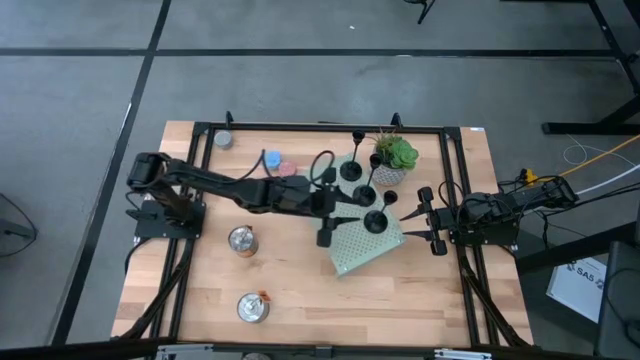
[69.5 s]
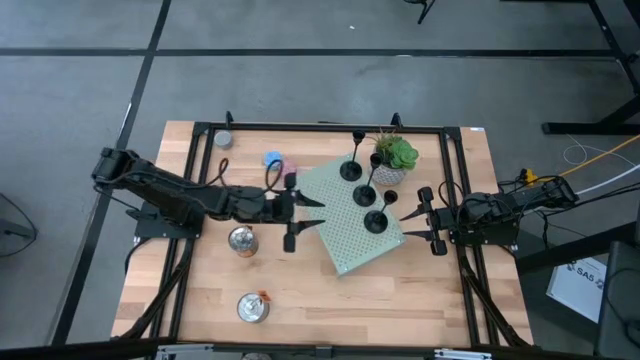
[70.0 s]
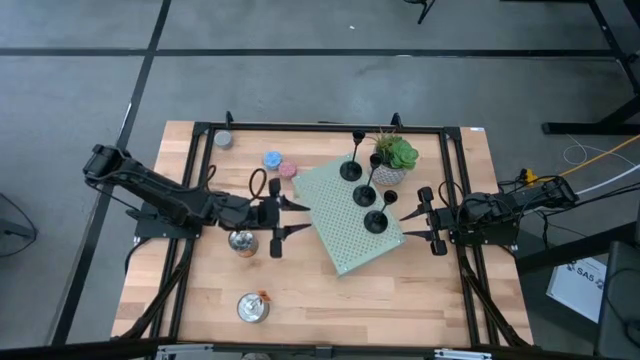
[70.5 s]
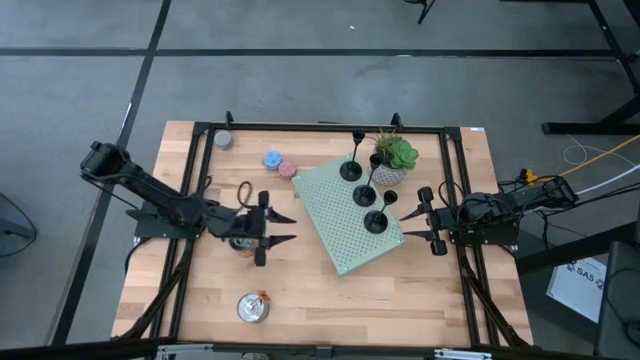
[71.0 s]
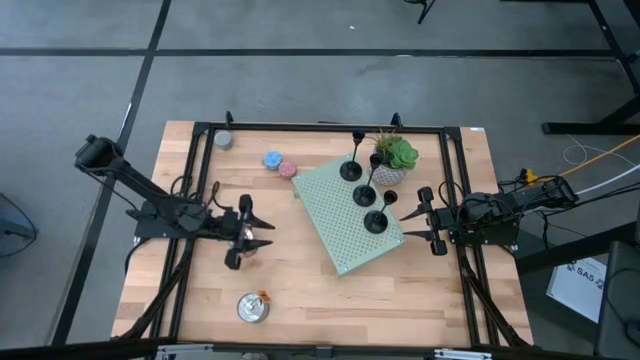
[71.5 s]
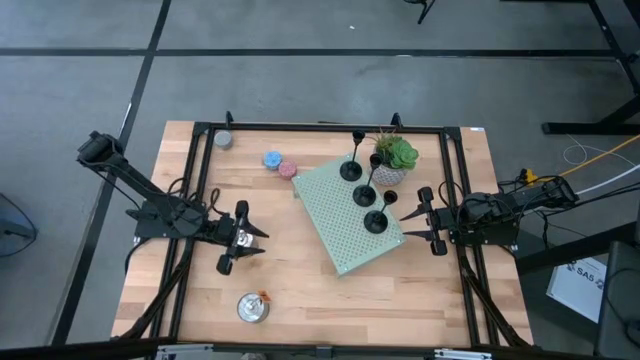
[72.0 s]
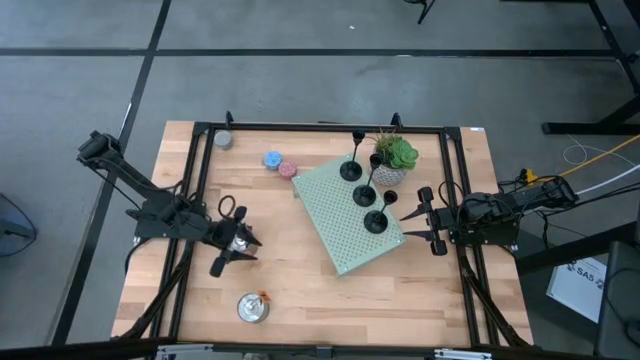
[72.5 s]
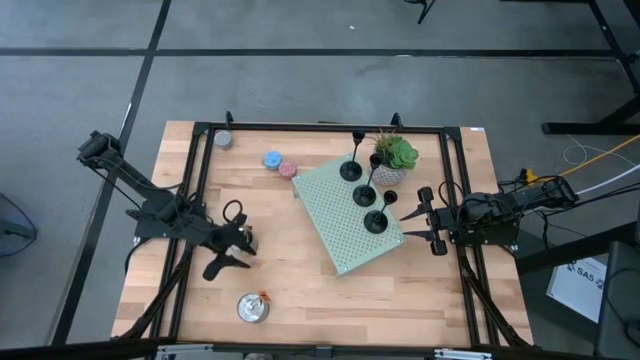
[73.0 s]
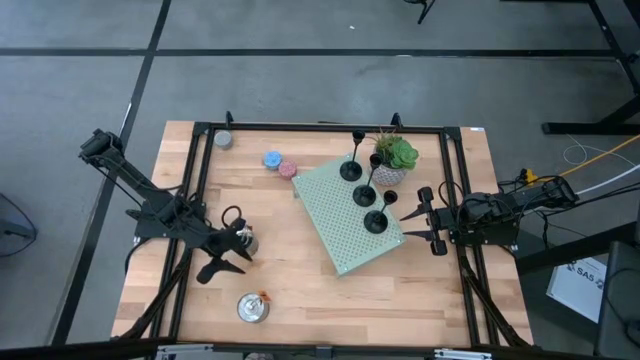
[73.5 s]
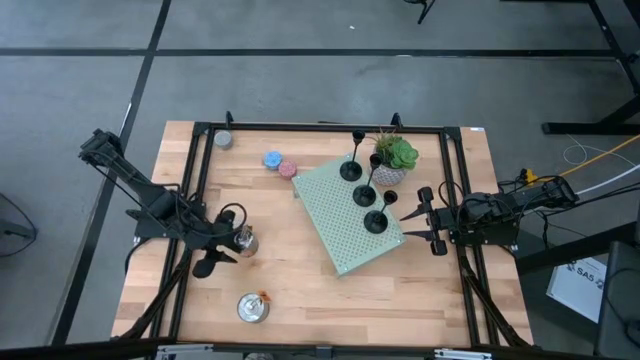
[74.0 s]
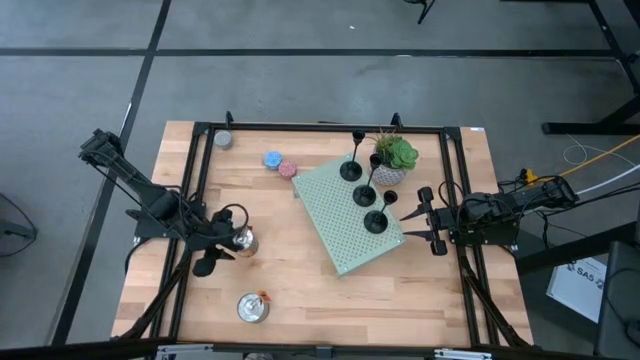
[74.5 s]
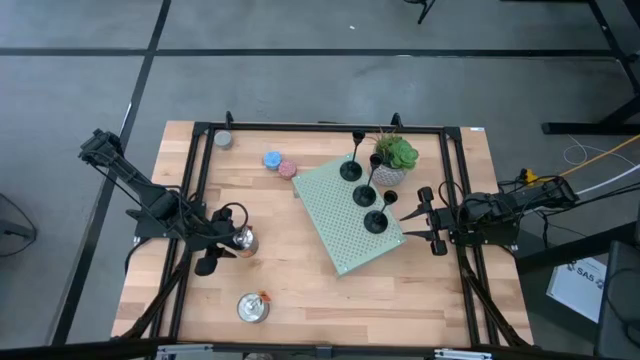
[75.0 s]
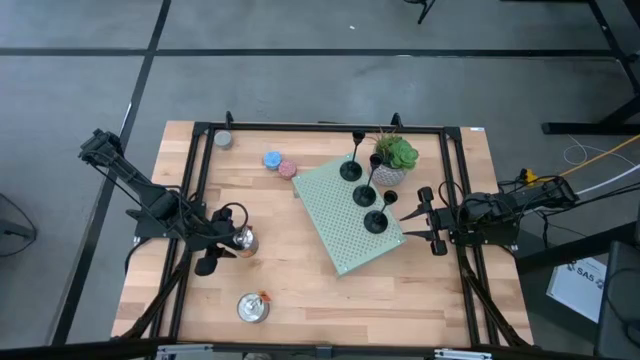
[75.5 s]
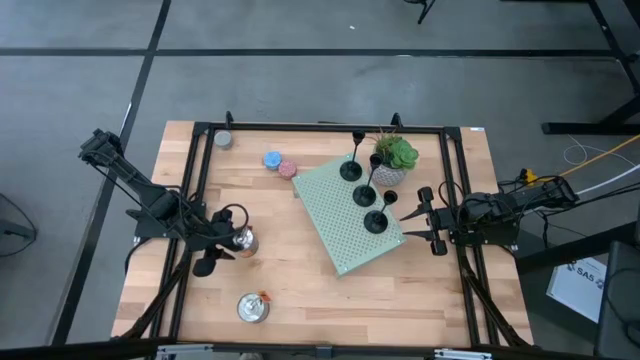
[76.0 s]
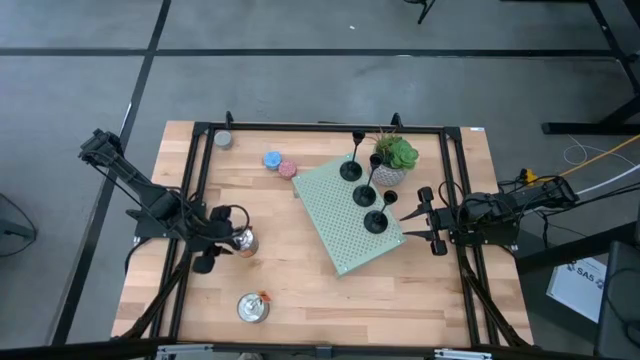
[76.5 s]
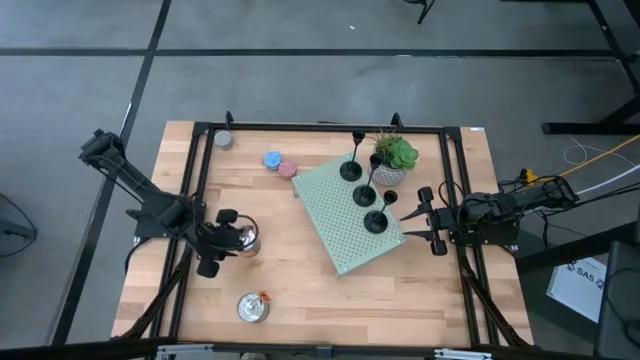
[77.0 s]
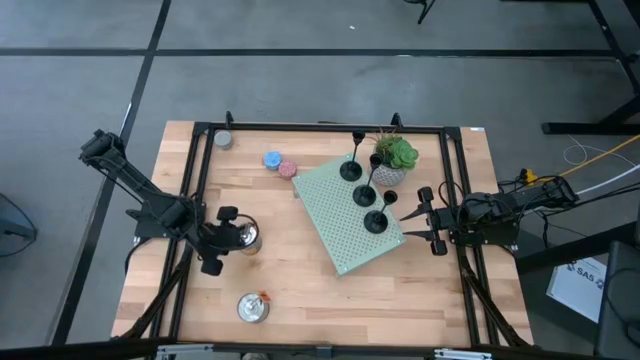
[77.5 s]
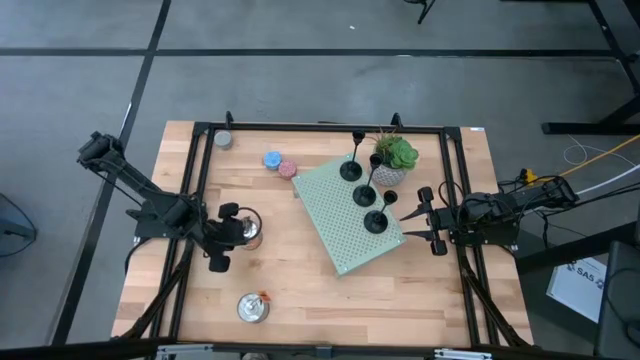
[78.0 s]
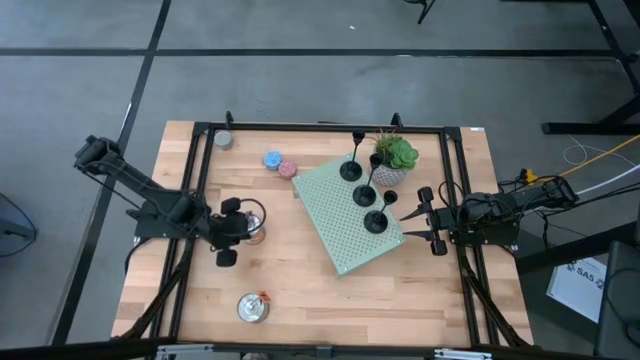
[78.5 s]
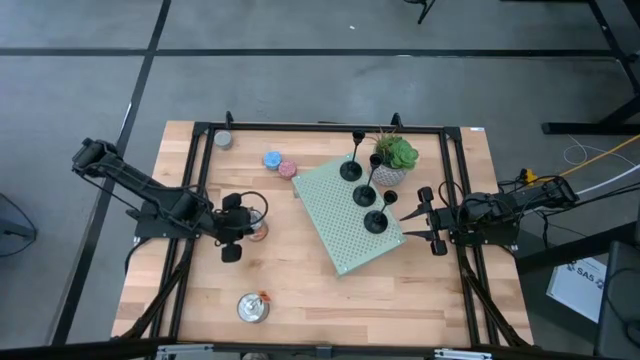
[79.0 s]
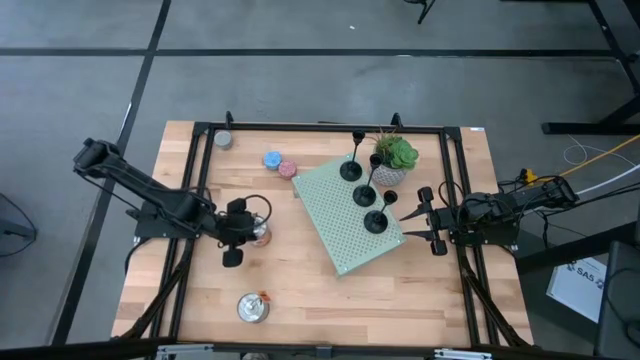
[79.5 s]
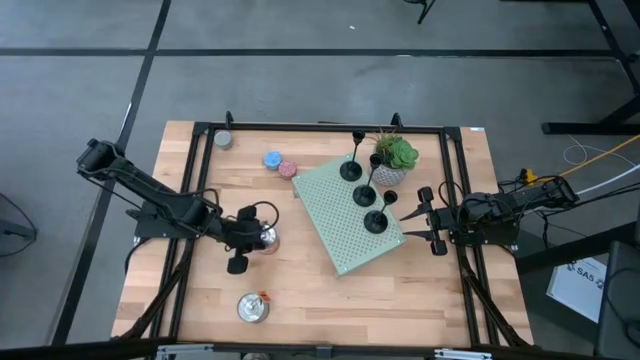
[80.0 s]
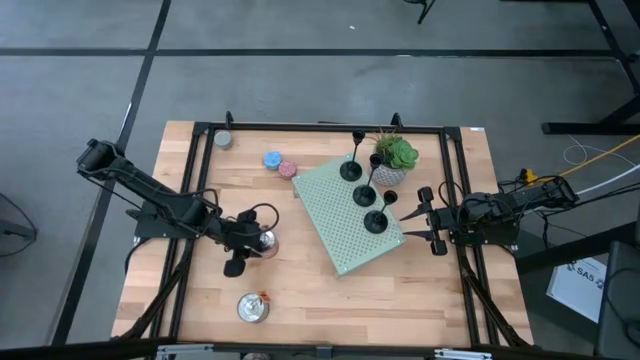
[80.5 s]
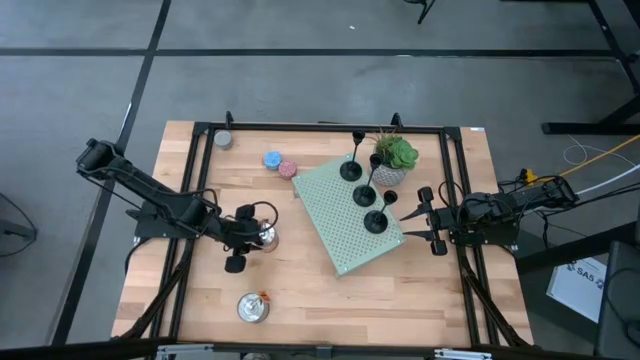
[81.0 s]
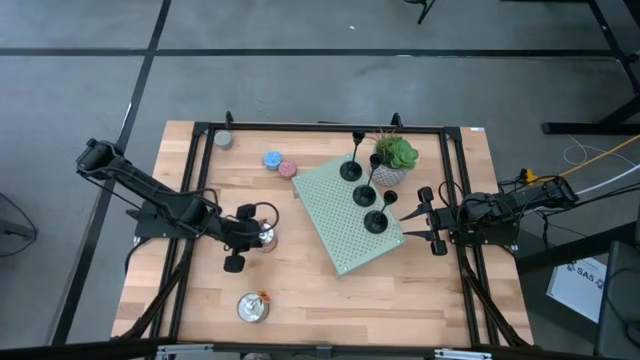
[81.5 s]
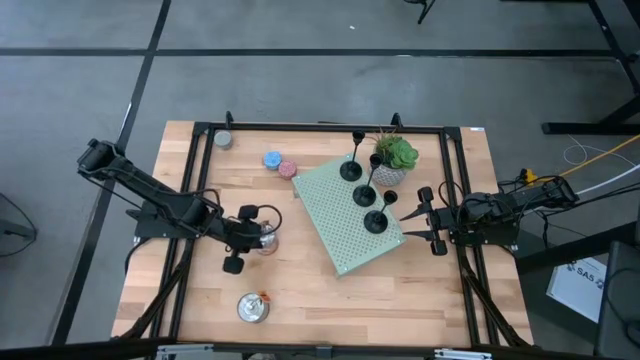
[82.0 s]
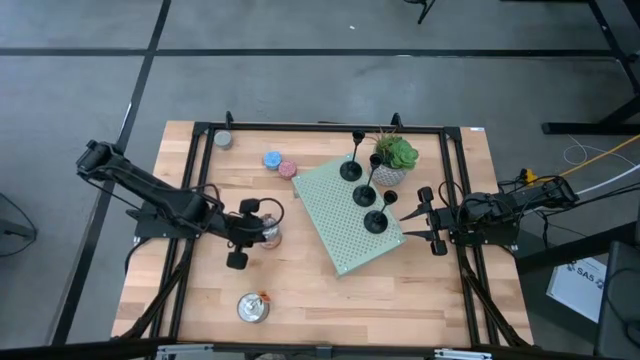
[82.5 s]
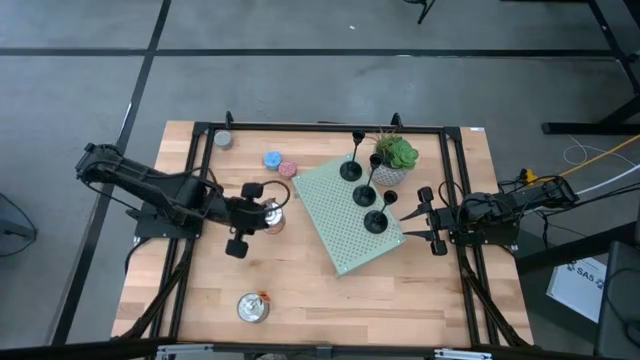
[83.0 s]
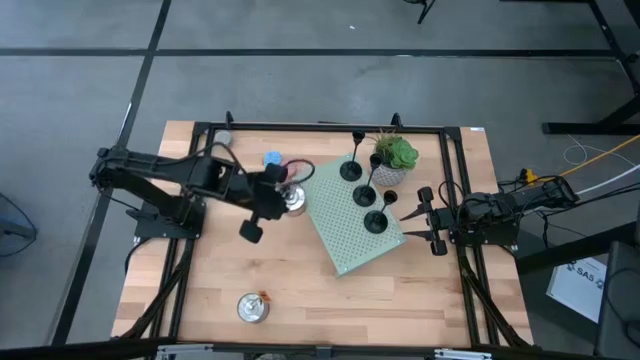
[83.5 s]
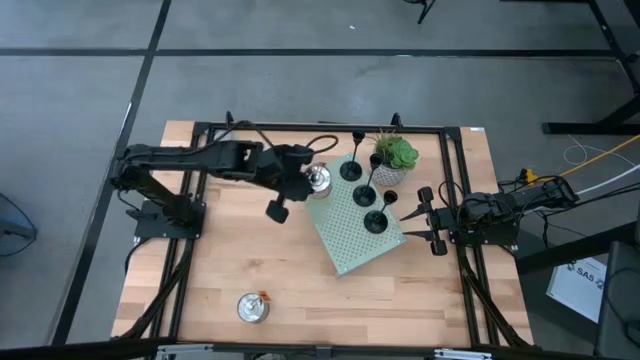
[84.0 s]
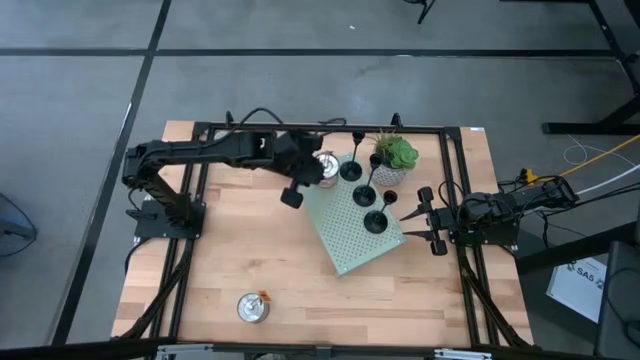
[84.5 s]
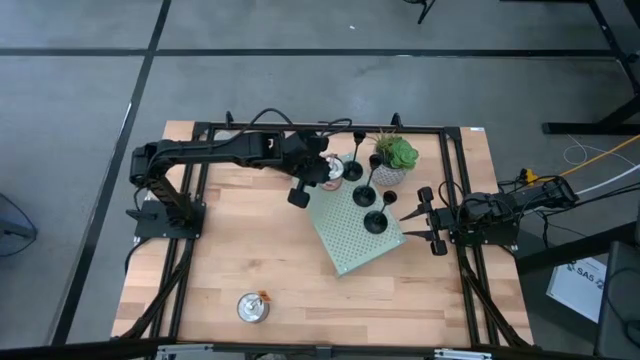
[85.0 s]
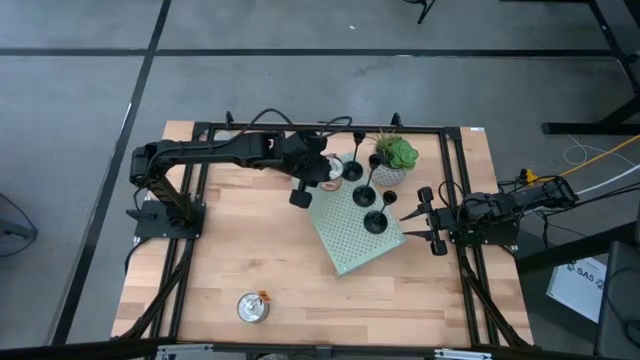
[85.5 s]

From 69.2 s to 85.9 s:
Task: Pick & Place candle stick holders
Put the orange canned scented candle on the shelf

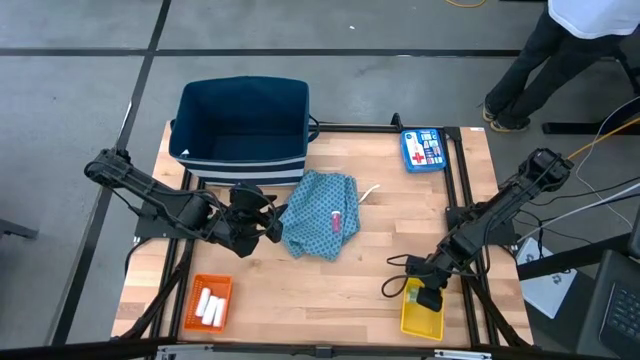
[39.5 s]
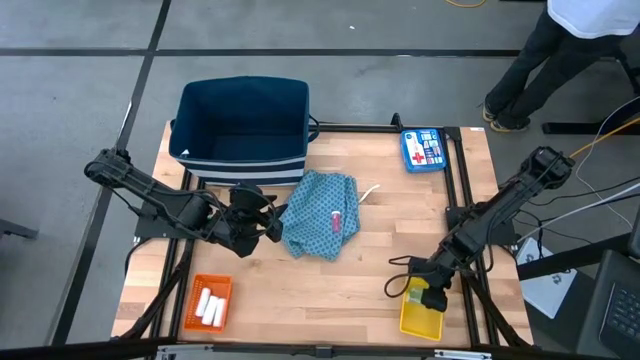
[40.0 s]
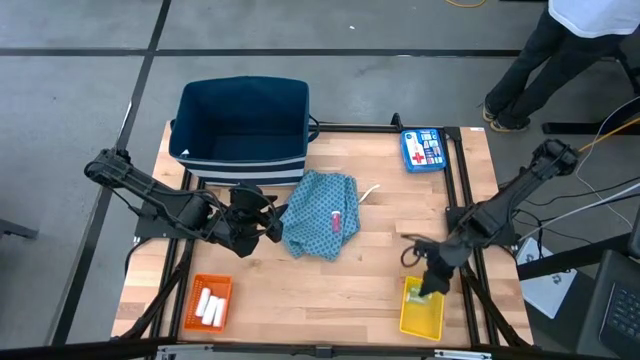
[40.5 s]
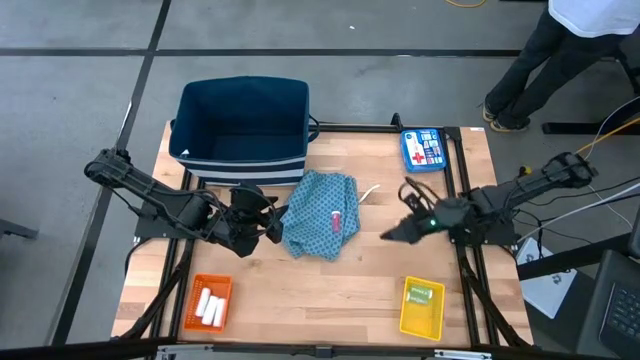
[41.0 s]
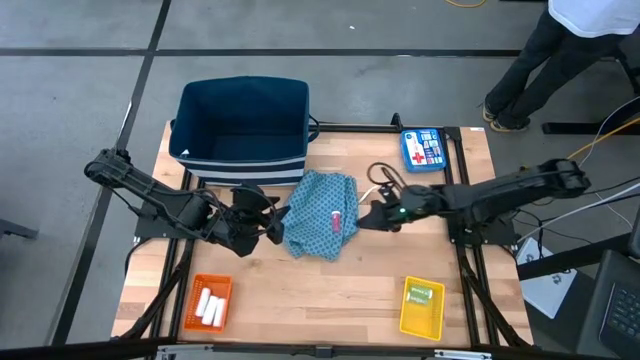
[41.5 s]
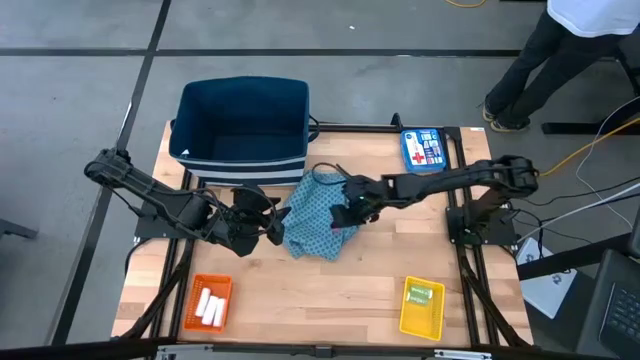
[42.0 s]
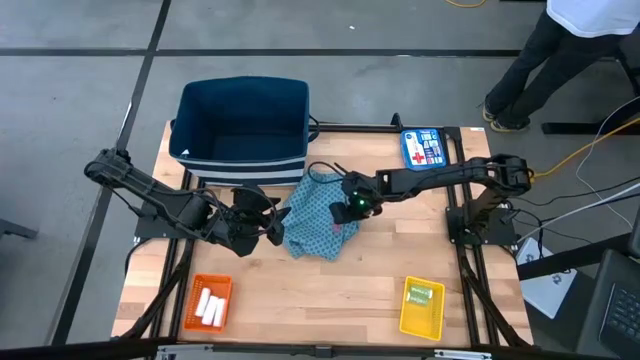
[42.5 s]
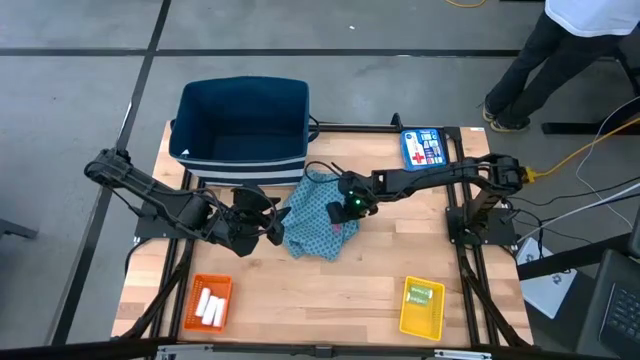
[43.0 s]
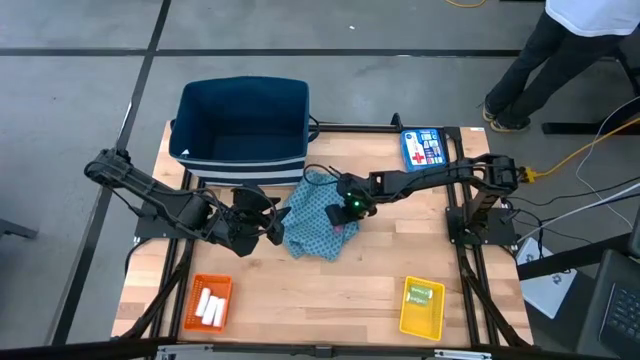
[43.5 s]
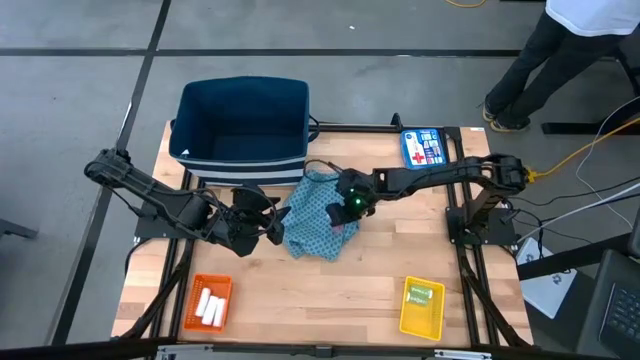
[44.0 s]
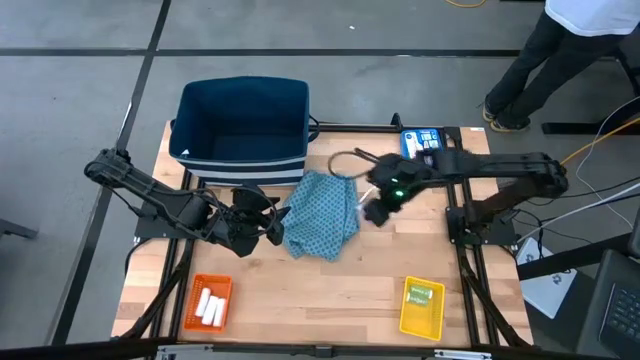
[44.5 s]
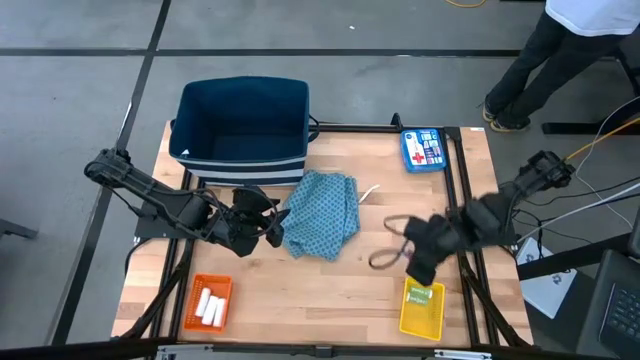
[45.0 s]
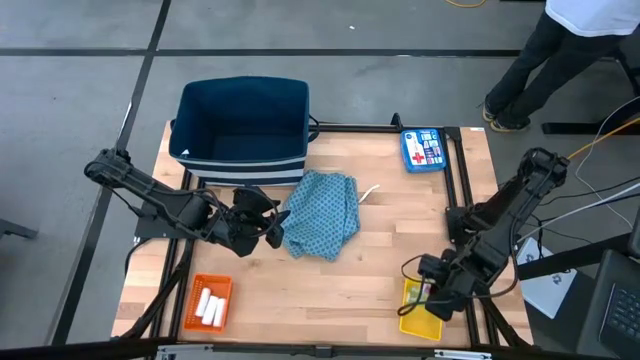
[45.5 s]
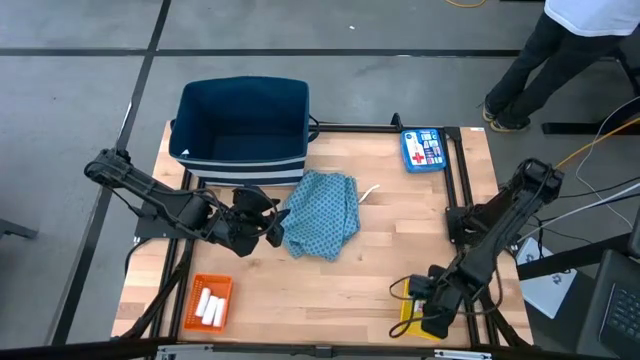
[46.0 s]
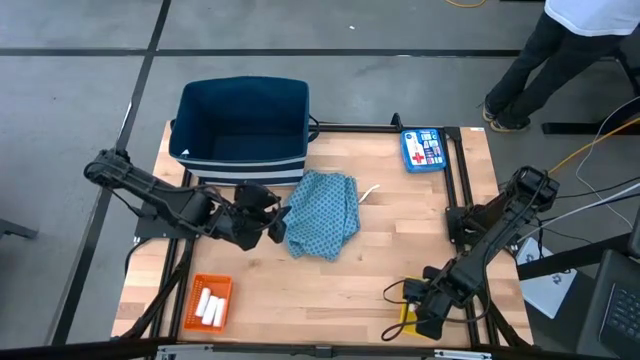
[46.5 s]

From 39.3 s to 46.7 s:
Task: Pick & Place Medicine items
Put the pink pill bottle into the yellow bin
